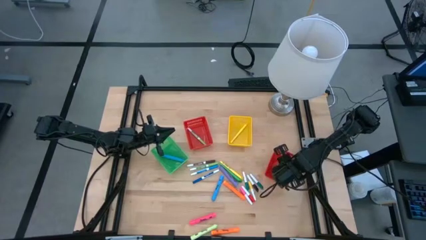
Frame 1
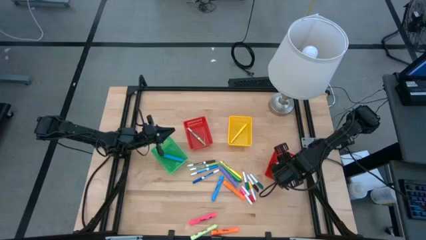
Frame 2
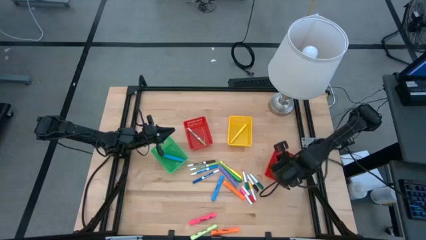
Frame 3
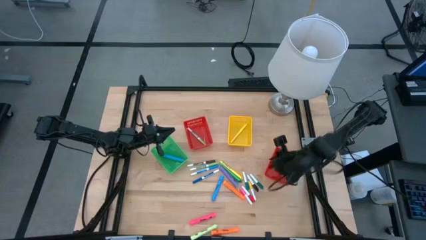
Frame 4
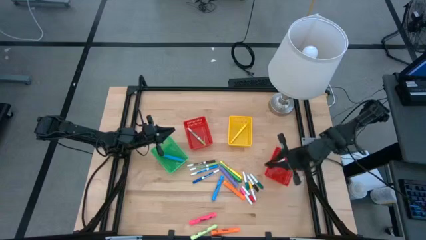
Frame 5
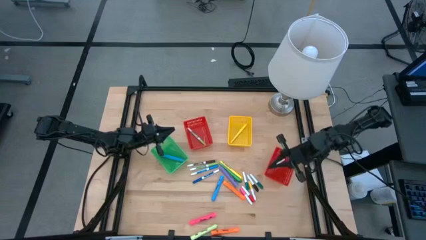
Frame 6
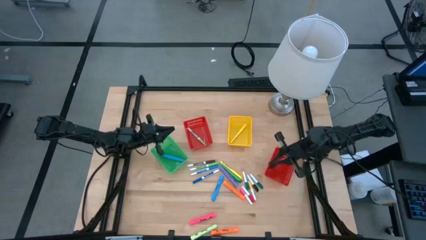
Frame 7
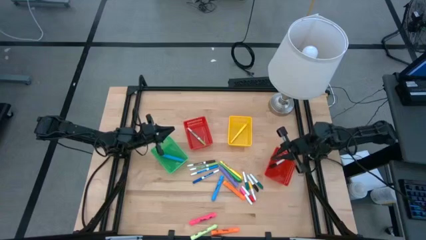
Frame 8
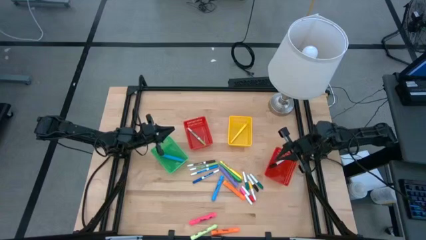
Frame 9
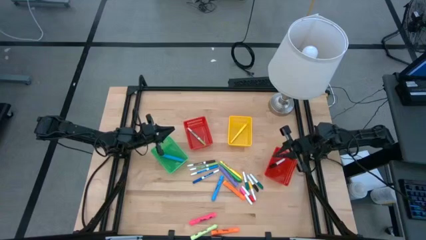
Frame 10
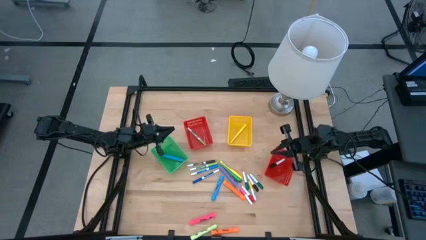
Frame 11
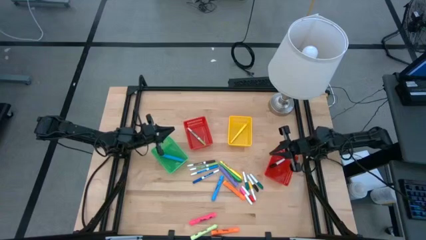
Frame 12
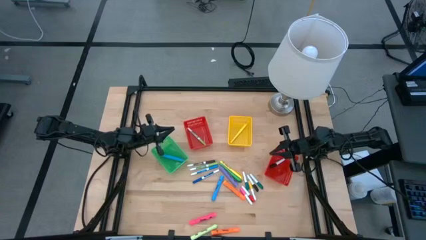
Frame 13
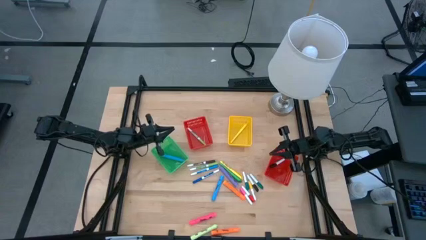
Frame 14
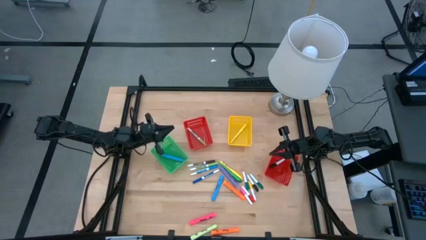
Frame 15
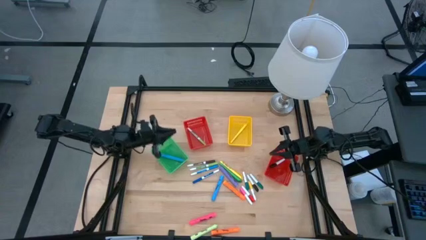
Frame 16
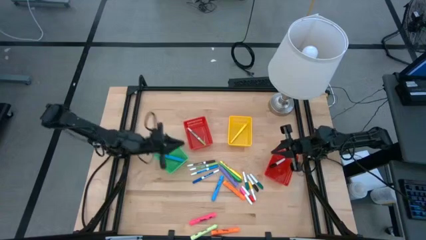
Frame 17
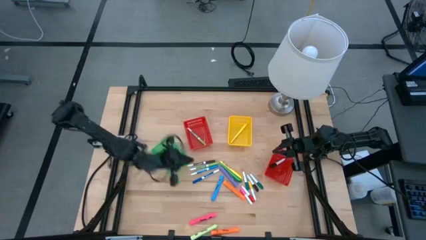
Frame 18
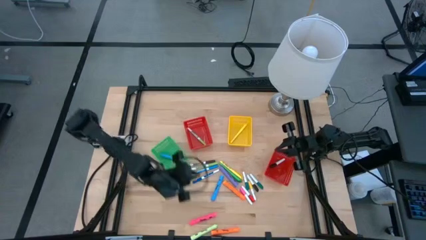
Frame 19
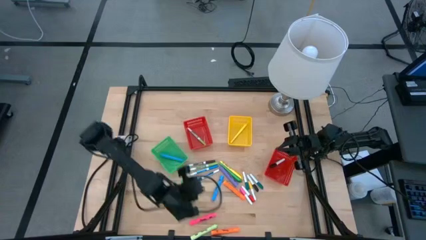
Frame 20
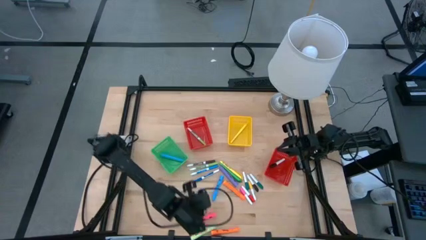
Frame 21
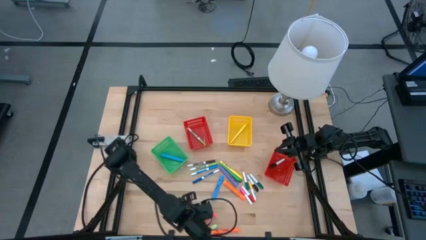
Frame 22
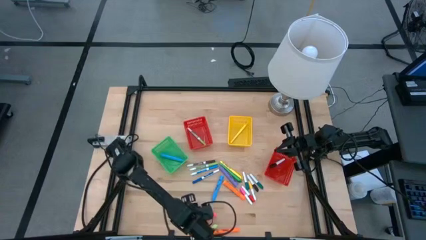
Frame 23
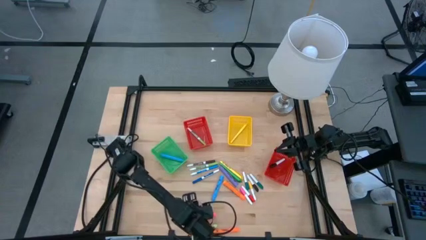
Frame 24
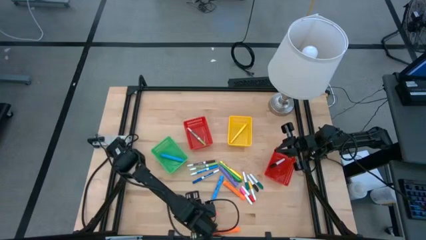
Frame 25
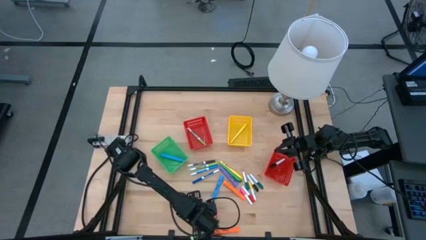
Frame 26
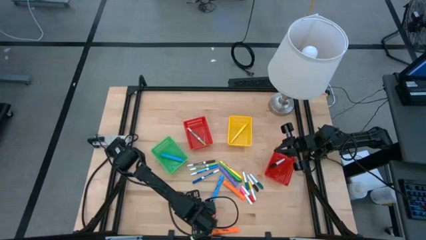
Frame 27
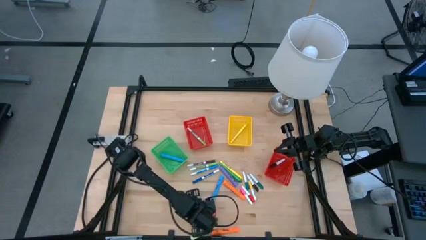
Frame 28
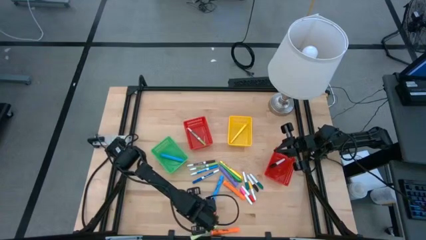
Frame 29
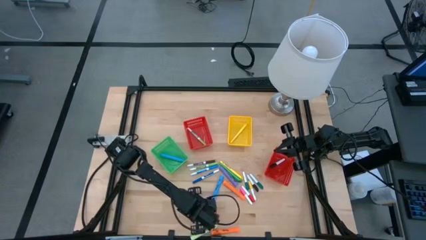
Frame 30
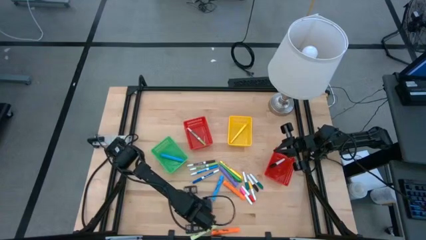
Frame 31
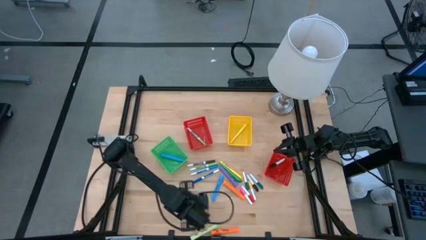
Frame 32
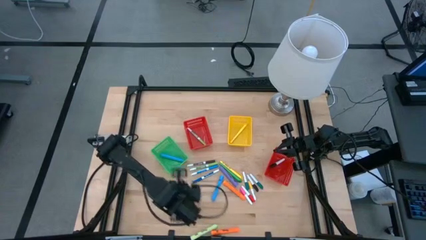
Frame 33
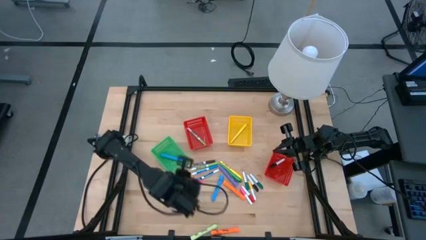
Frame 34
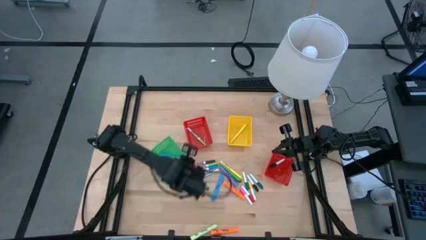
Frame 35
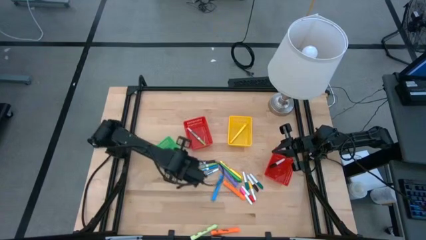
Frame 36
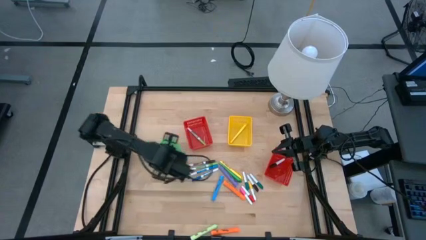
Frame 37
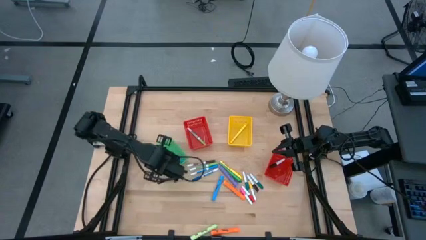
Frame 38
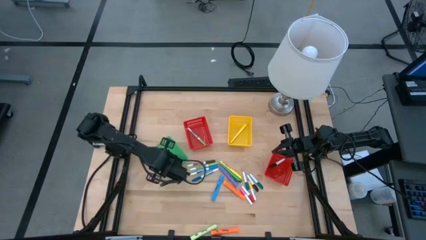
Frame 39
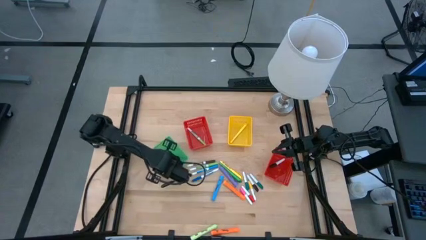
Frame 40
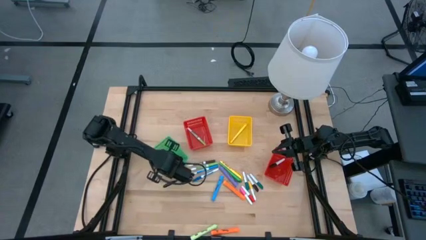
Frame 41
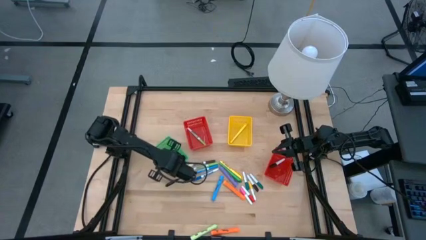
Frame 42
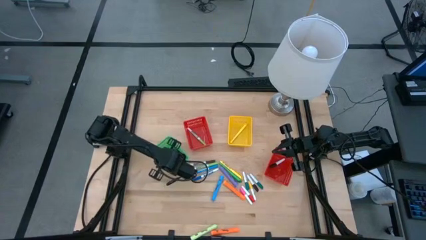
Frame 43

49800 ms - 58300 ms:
Task: Pick & Place Markers
Put the large pink highlighter pen into the green bin

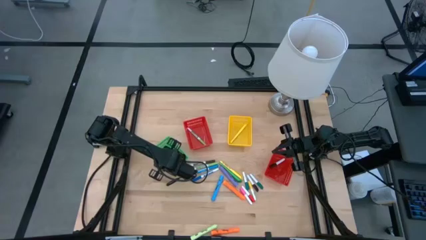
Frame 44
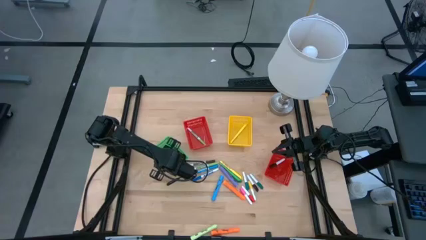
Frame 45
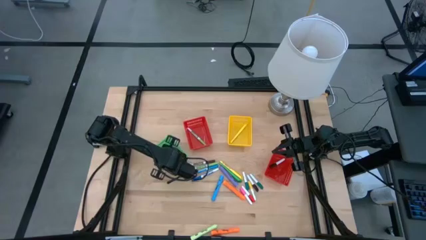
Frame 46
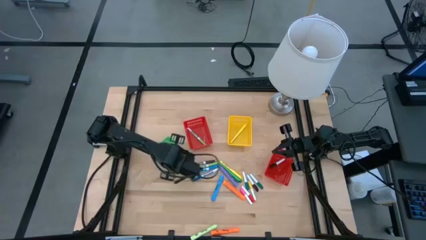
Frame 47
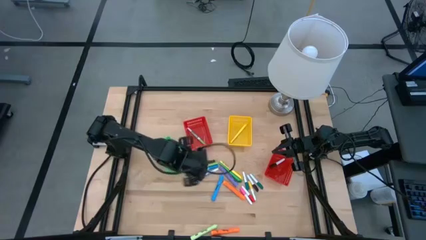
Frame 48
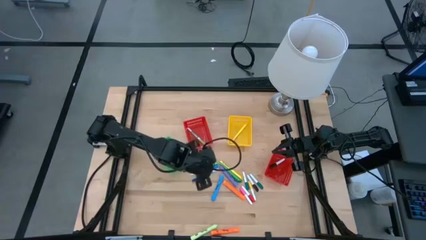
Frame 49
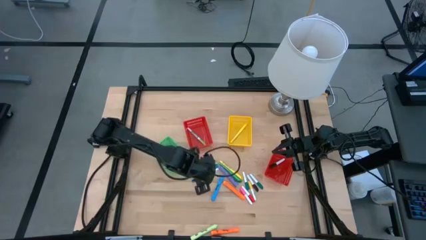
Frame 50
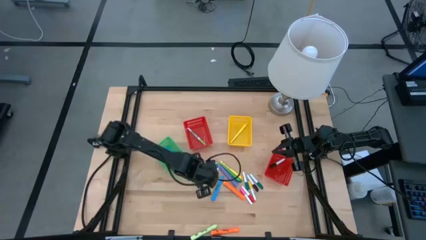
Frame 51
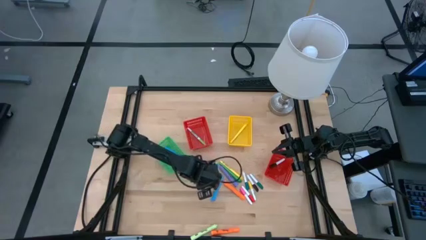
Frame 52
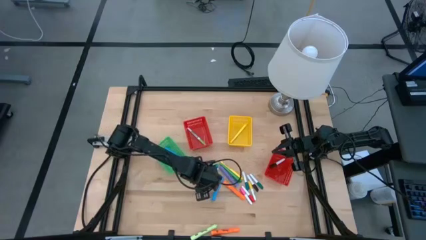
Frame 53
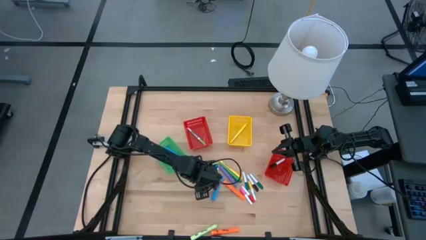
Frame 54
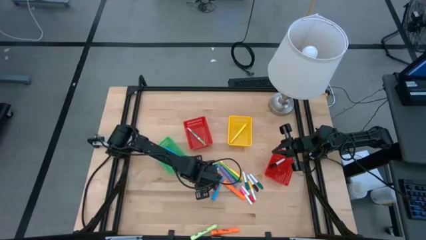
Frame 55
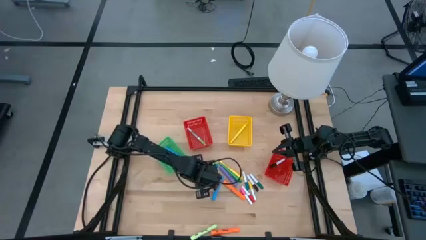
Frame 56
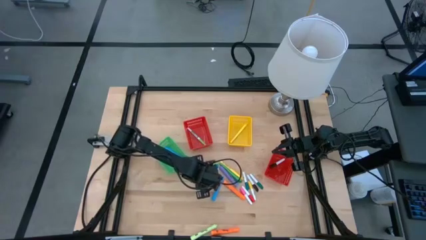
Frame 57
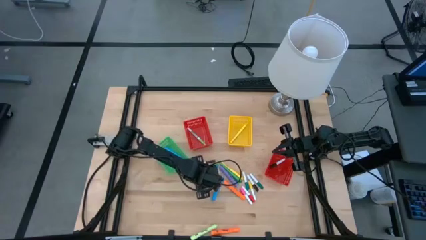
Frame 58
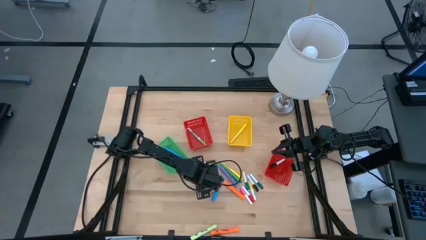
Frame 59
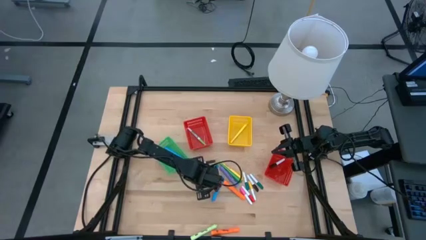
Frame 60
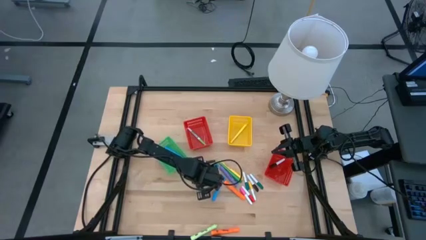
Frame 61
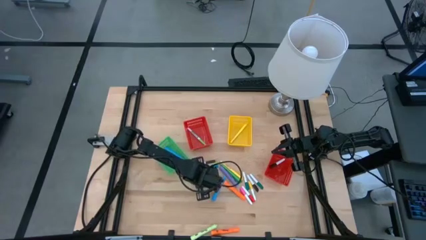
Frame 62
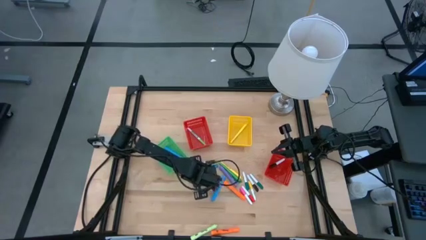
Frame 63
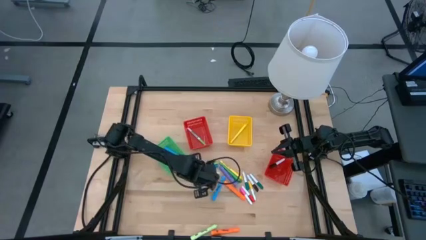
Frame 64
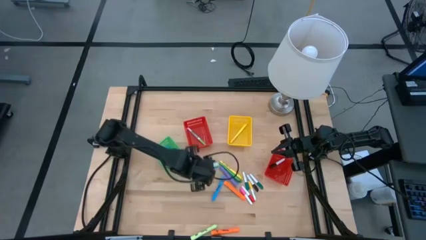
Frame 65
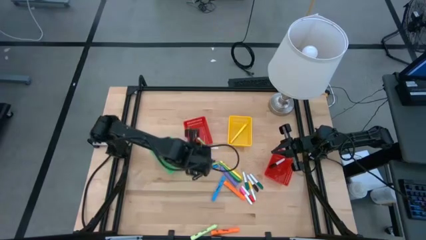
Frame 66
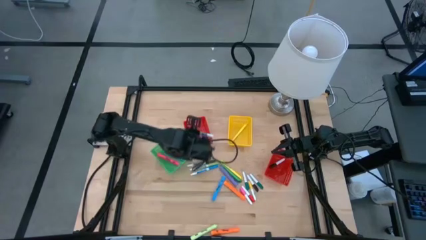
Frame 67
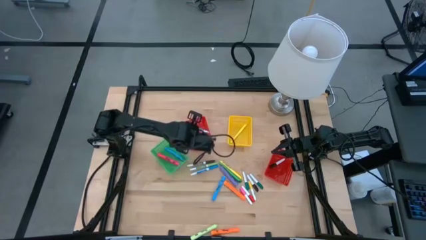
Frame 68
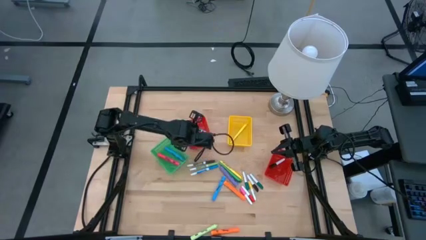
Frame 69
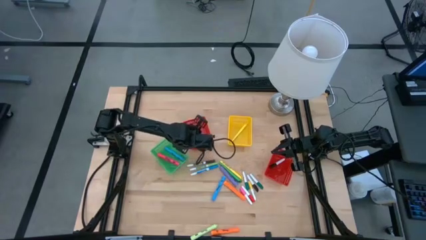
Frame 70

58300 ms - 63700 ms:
Put the dark blue marker pen into the left red bin
